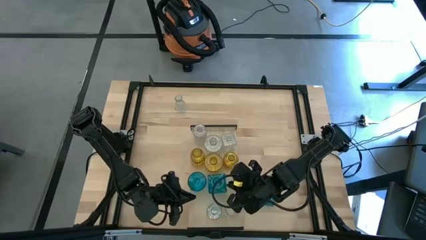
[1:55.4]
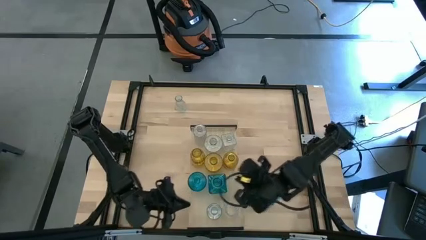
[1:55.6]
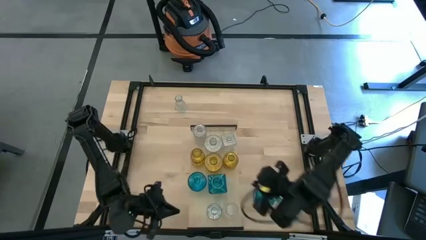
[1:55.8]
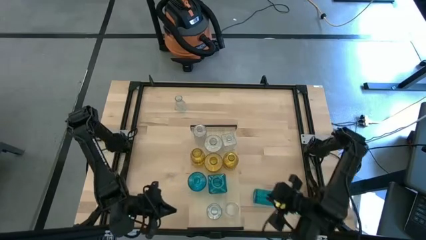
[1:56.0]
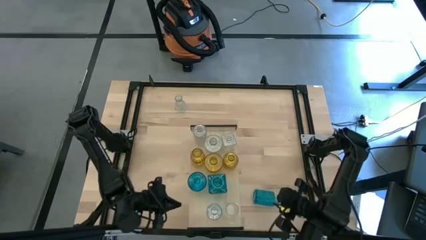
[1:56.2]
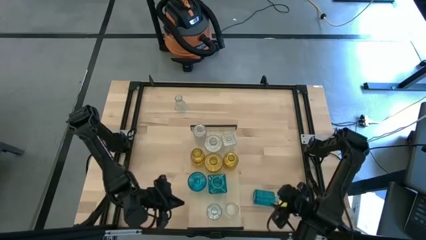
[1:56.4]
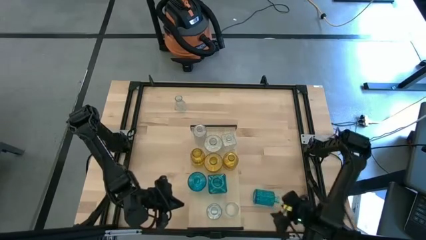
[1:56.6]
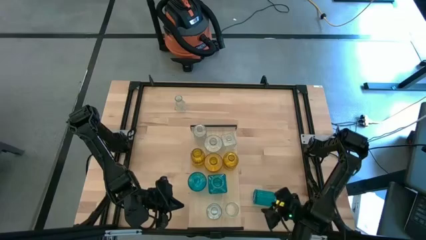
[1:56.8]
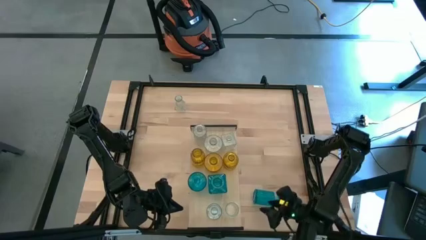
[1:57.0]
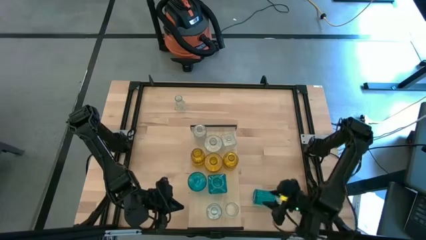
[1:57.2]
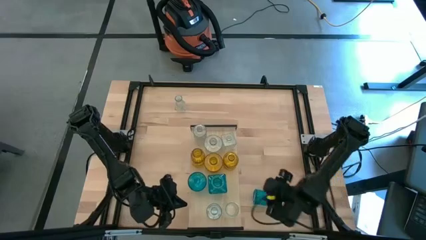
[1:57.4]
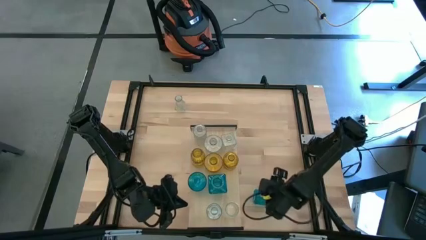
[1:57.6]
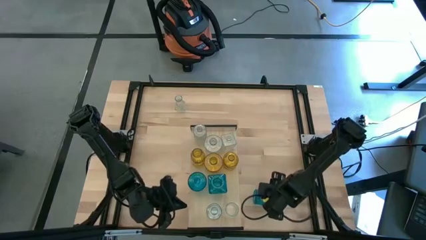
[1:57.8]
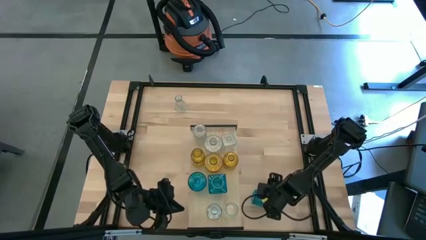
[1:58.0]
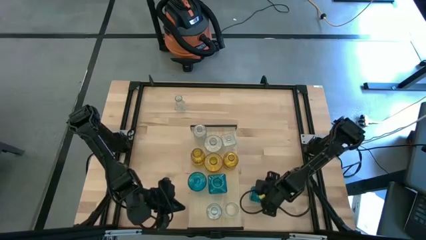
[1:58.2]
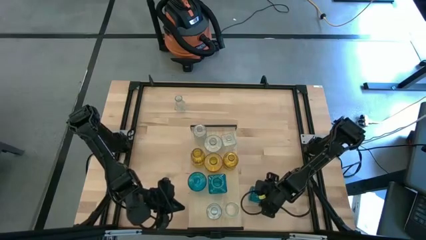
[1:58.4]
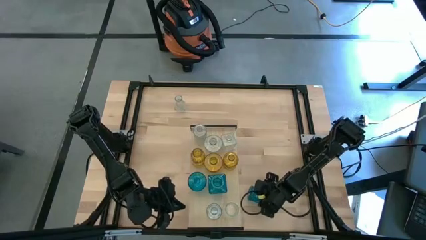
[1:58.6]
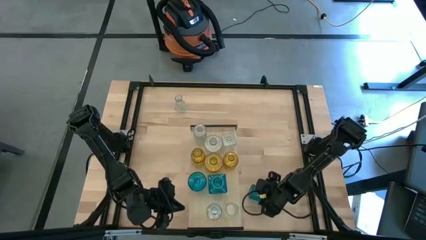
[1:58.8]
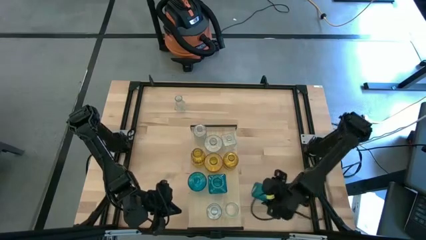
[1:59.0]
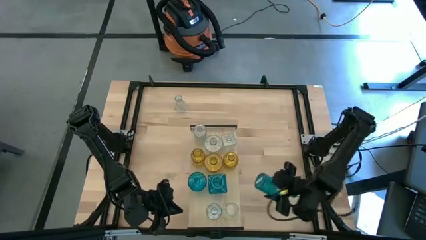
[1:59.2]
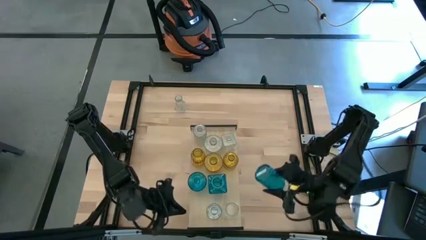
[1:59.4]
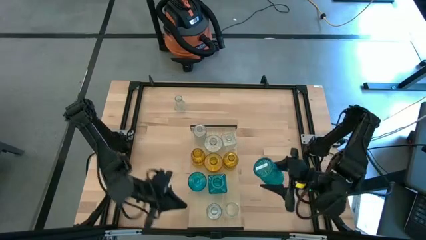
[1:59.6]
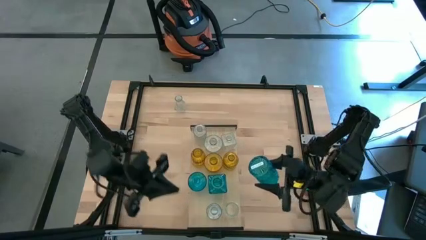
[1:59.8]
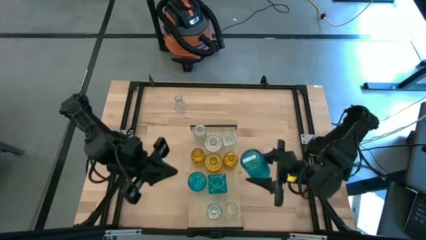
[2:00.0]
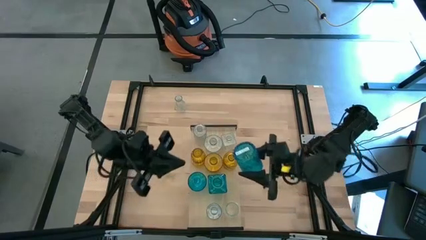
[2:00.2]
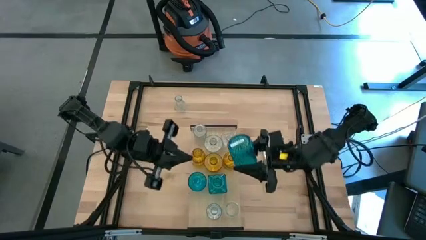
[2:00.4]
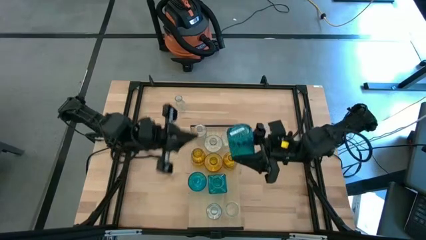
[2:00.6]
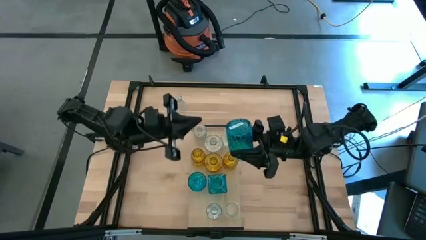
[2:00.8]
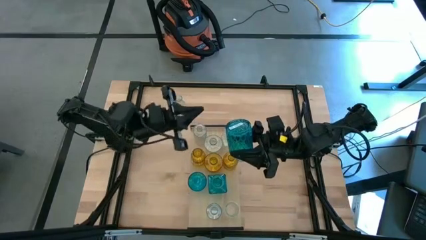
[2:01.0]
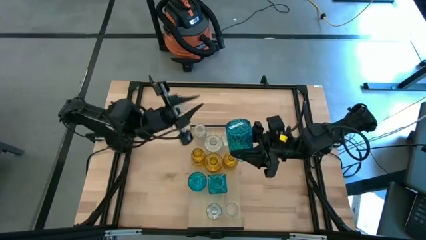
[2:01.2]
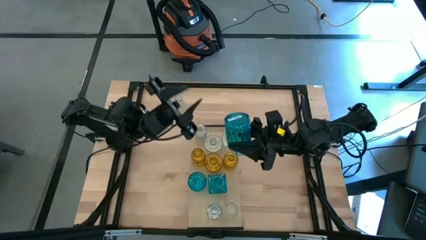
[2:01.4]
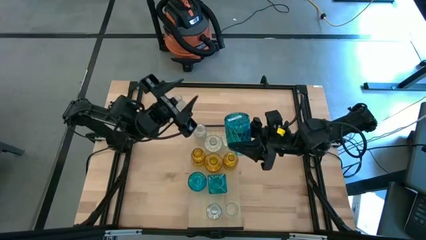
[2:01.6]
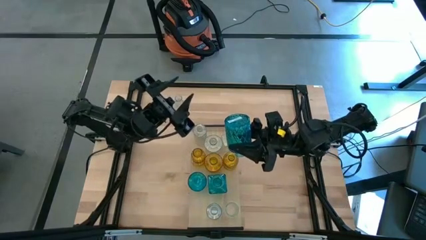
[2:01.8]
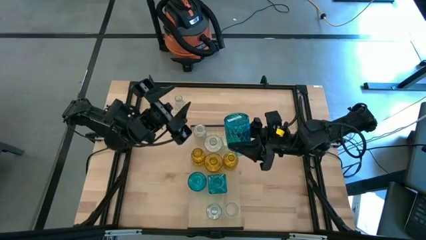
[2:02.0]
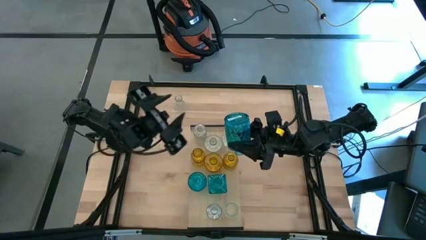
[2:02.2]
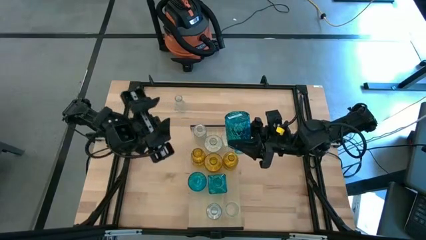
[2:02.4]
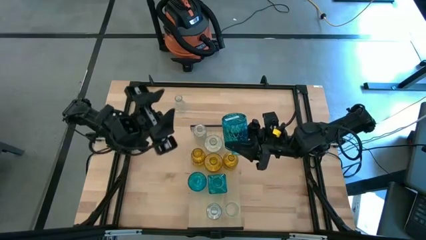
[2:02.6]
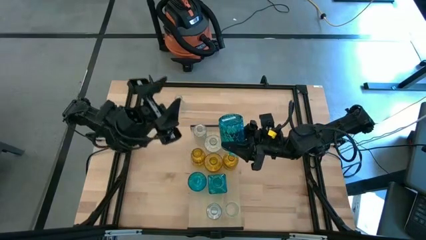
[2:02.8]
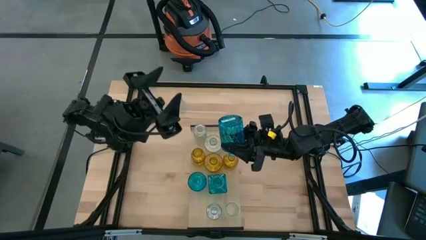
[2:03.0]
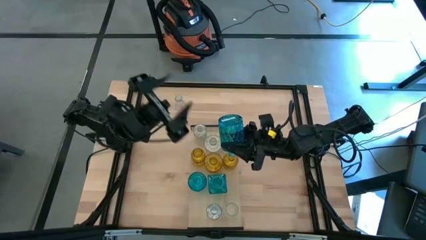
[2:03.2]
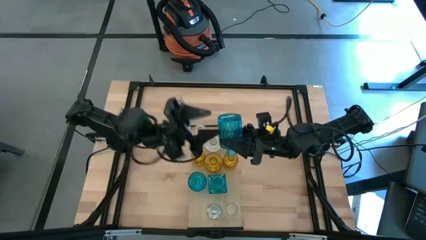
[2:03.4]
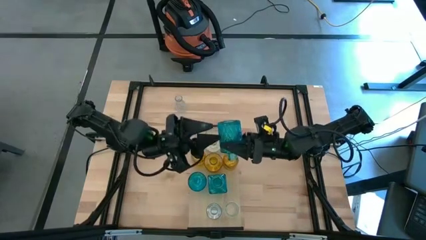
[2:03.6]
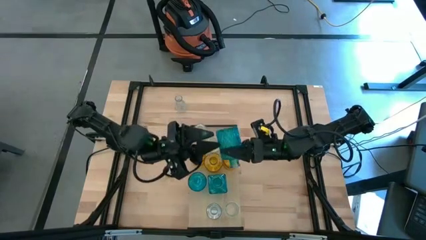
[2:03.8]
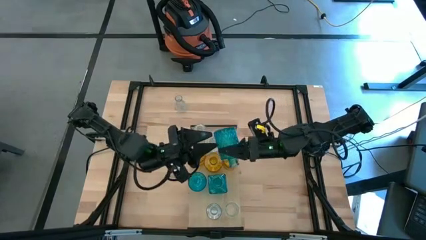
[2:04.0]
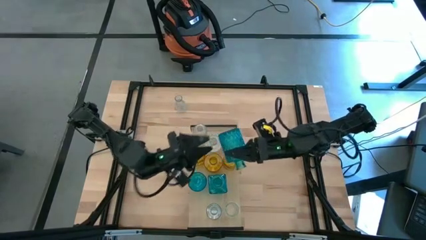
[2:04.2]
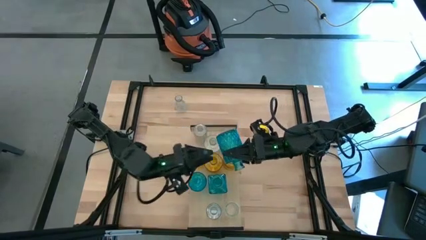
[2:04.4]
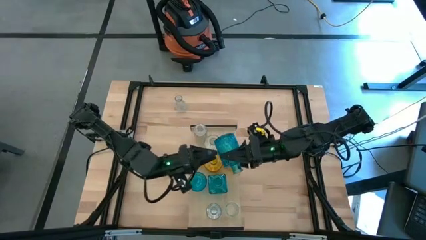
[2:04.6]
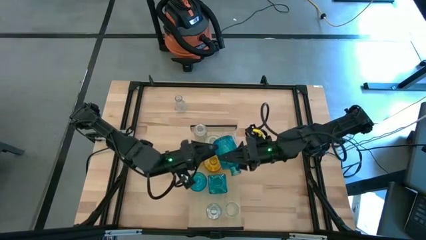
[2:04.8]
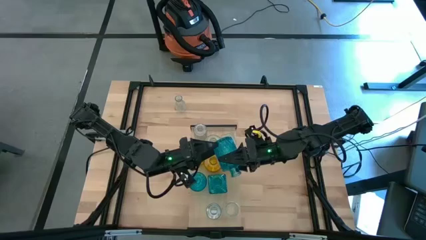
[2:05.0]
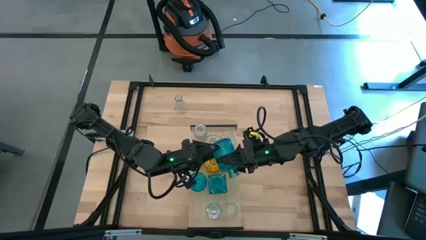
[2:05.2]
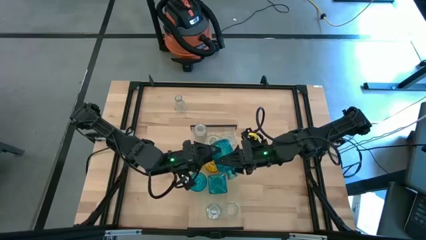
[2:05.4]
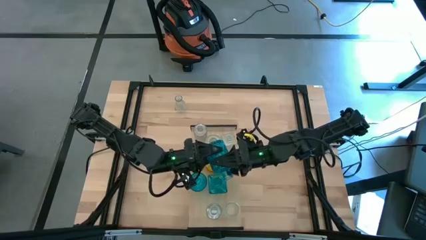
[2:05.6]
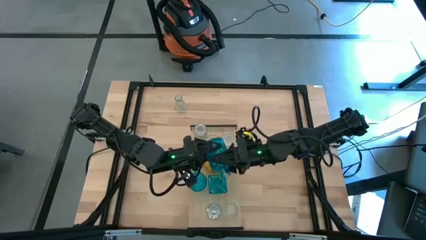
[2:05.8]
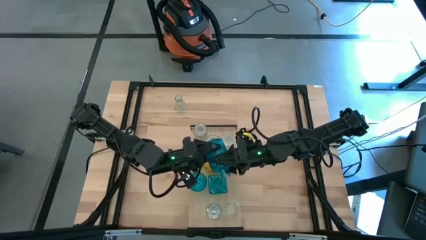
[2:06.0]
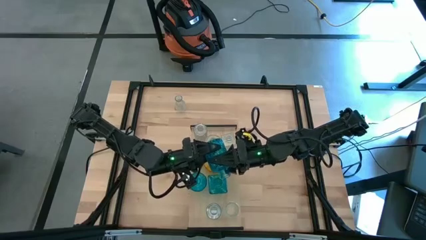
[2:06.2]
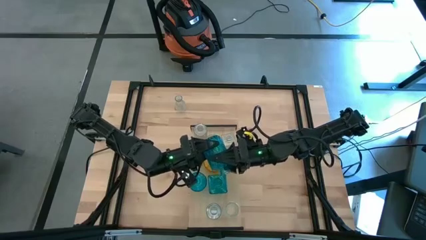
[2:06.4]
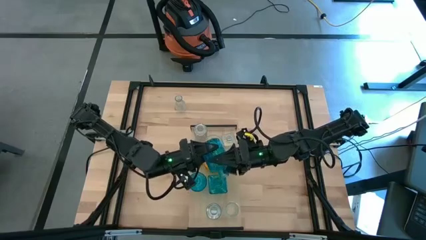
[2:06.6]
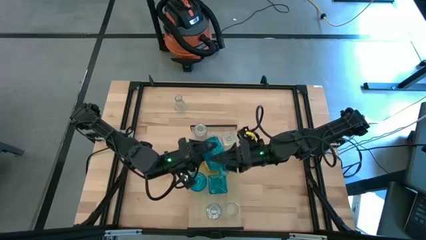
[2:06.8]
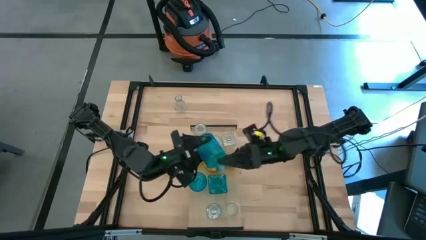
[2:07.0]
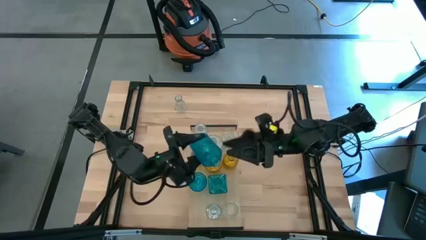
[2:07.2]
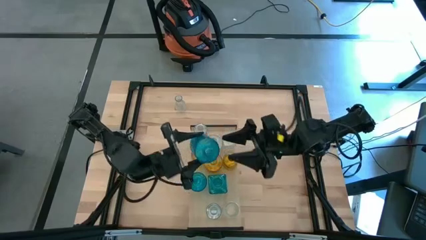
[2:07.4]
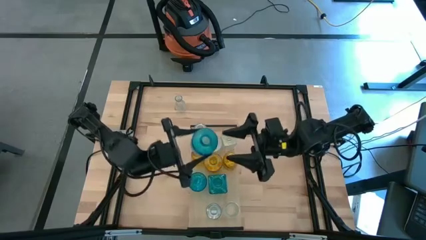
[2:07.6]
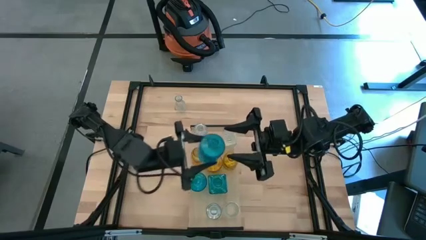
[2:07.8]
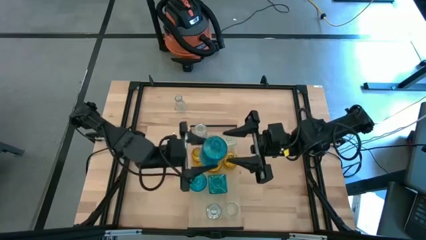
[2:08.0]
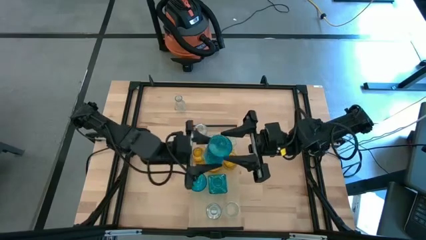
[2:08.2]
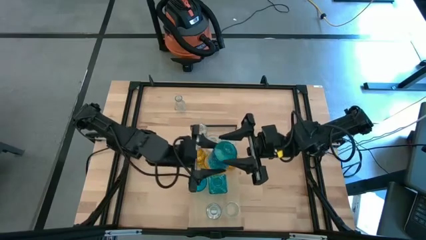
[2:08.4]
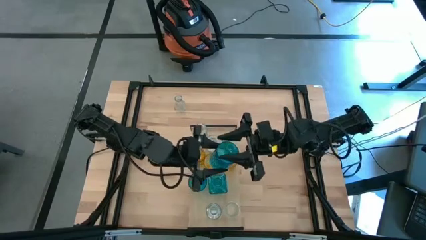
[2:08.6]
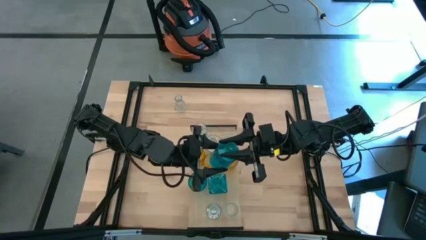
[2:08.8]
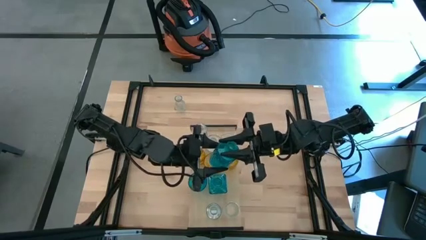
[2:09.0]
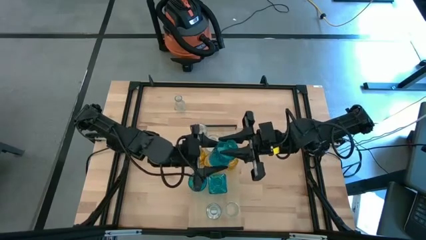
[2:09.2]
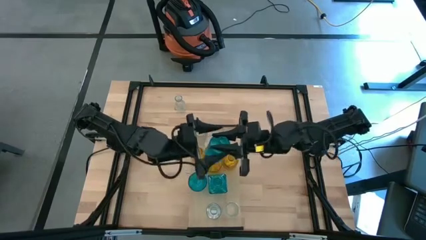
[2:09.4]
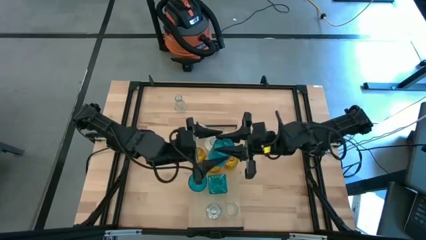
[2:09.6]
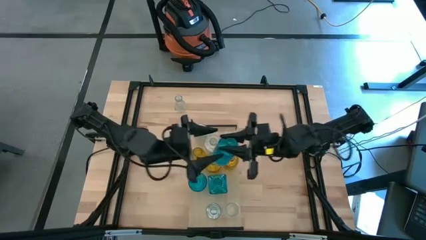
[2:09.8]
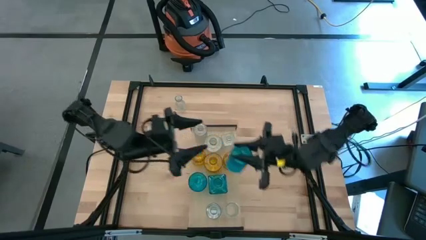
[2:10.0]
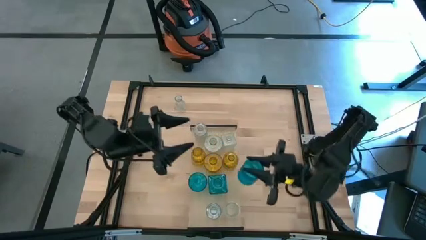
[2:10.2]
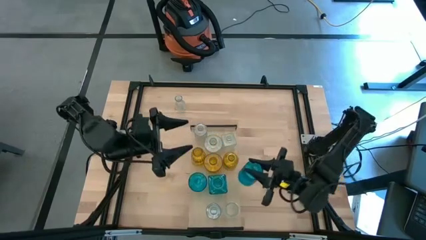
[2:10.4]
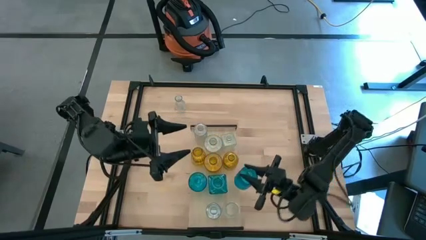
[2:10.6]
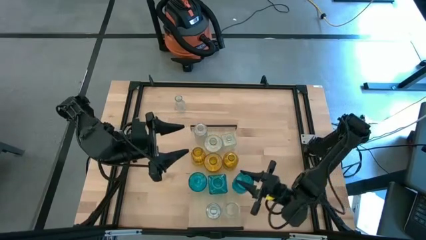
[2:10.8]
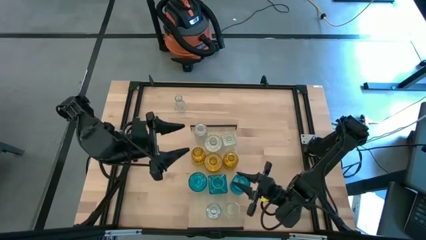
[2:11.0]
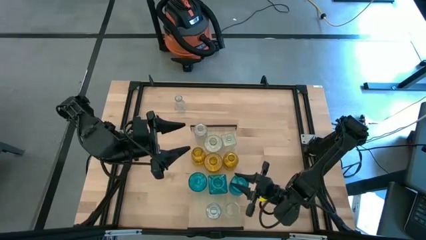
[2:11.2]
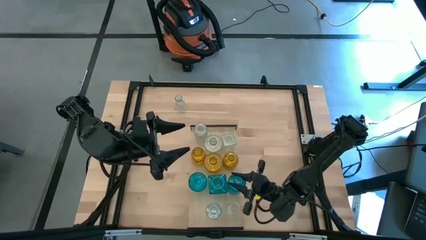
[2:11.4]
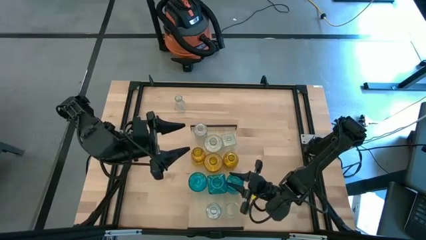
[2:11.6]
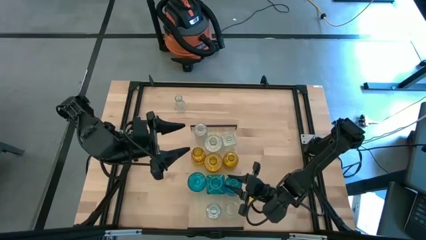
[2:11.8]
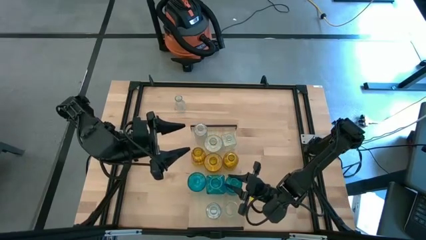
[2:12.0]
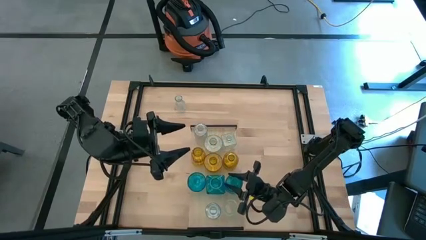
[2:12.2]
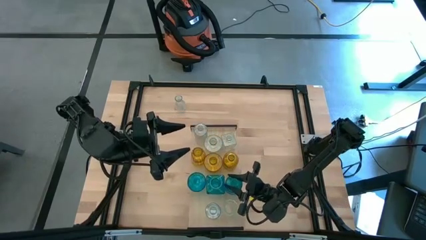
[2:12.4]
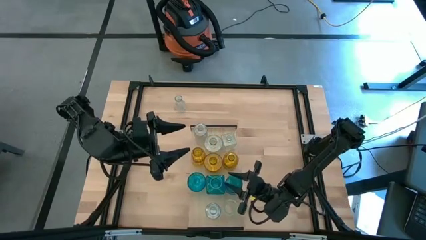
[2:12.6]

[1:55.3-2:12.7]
Task: sort vases onto shelf
Put the blue vase on the shelf aligned with the other blue vases
